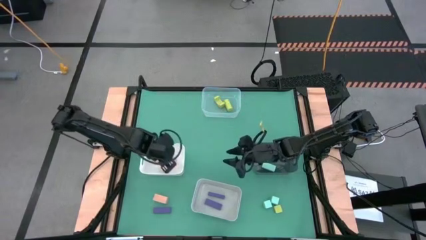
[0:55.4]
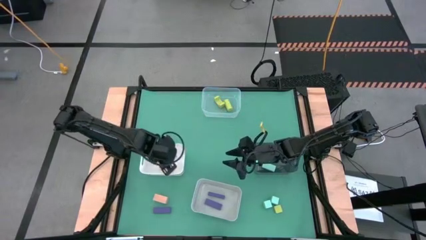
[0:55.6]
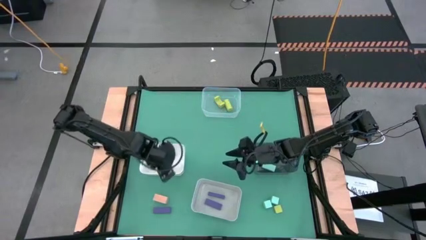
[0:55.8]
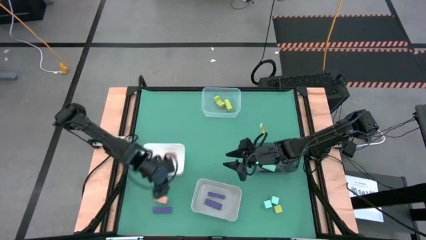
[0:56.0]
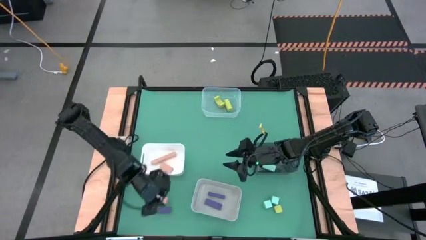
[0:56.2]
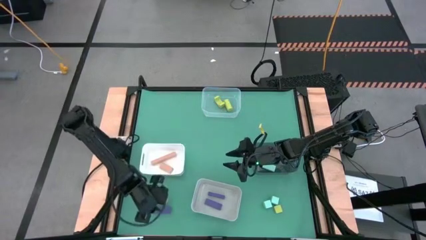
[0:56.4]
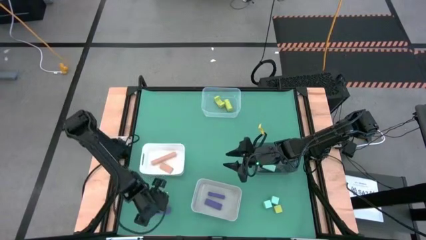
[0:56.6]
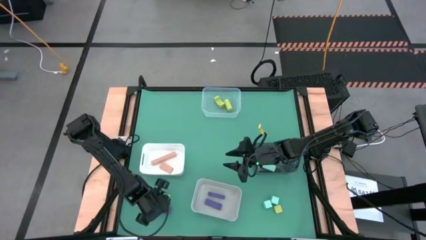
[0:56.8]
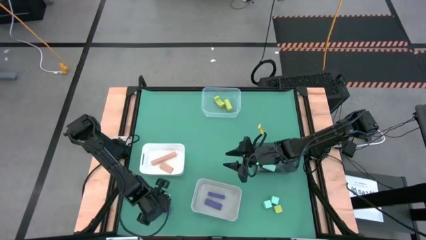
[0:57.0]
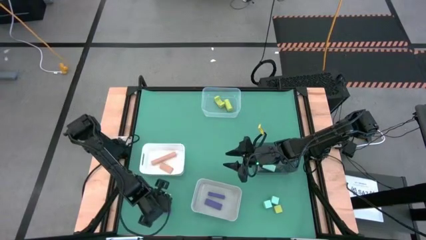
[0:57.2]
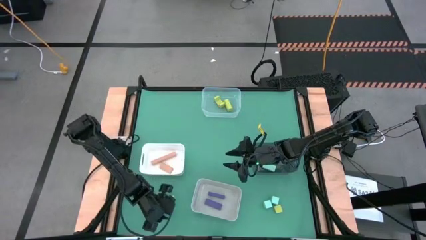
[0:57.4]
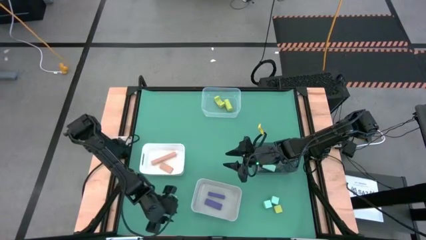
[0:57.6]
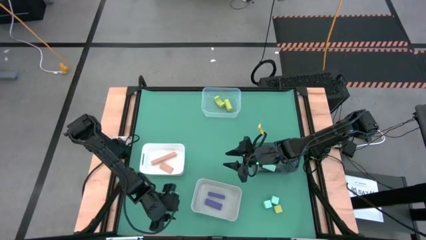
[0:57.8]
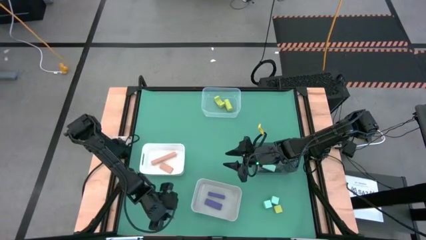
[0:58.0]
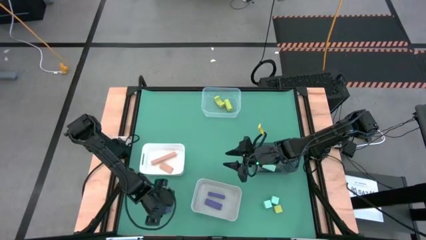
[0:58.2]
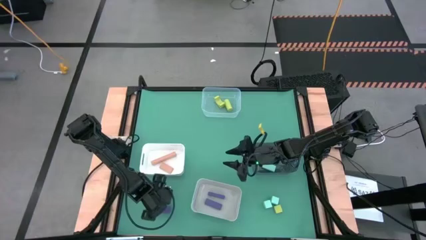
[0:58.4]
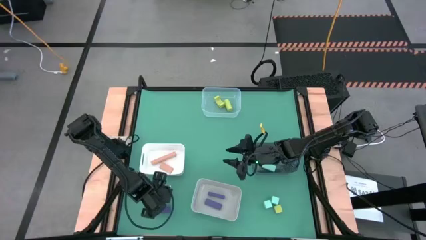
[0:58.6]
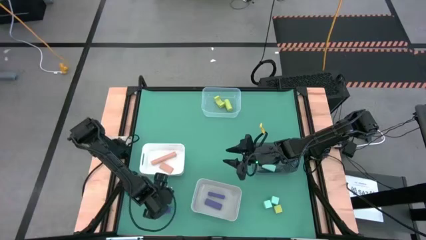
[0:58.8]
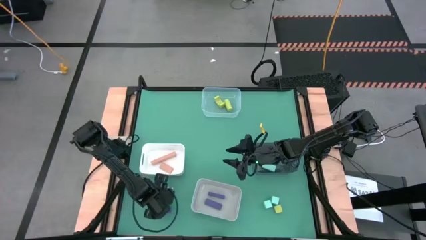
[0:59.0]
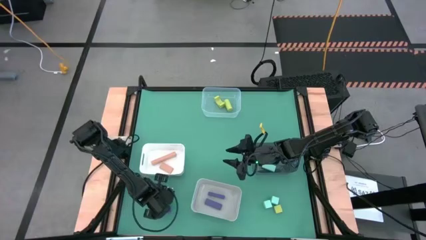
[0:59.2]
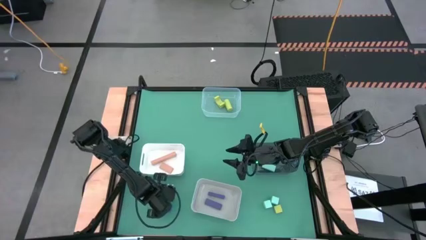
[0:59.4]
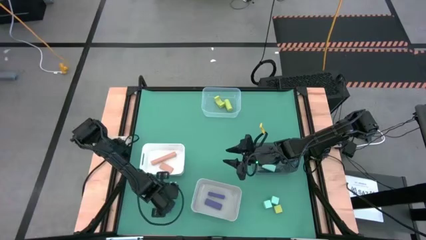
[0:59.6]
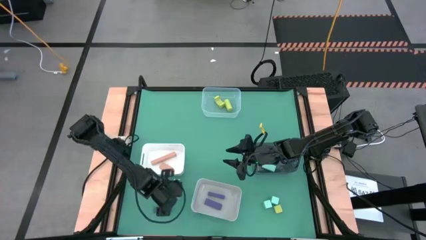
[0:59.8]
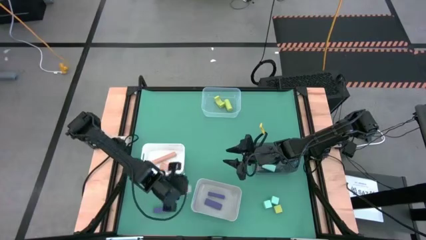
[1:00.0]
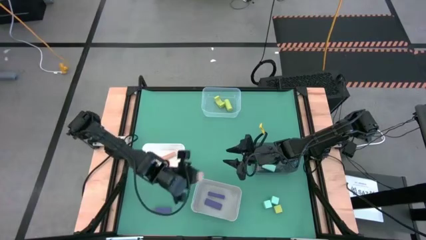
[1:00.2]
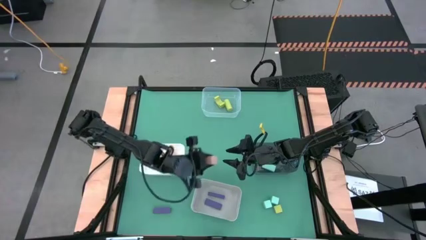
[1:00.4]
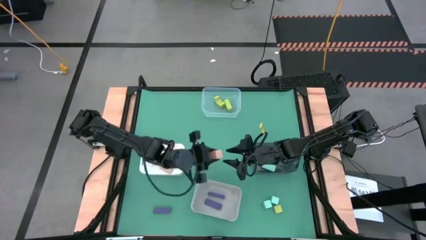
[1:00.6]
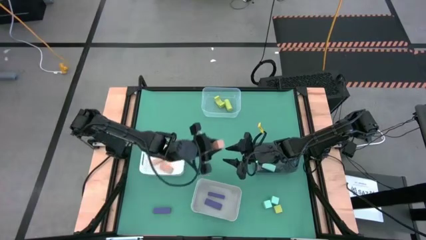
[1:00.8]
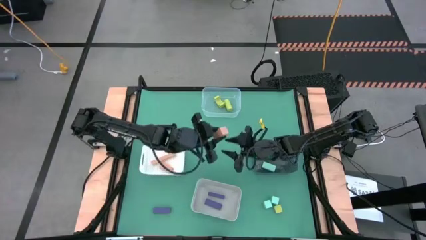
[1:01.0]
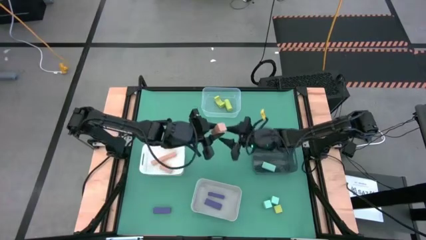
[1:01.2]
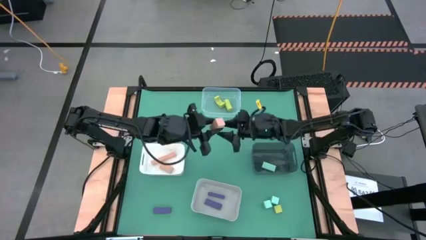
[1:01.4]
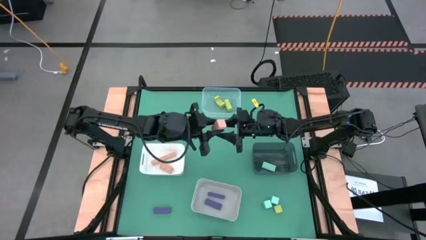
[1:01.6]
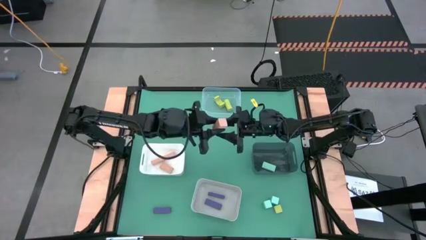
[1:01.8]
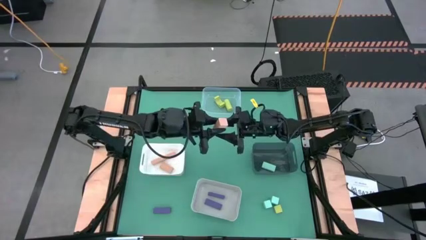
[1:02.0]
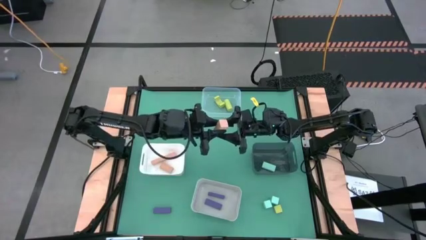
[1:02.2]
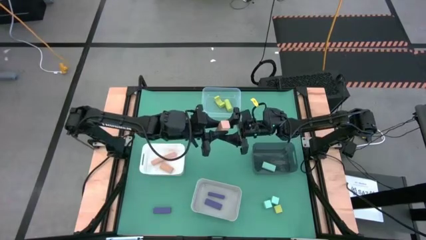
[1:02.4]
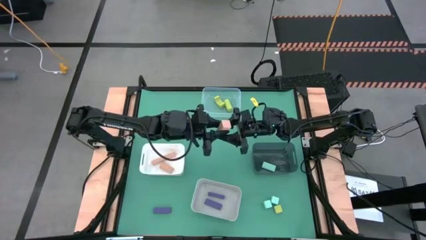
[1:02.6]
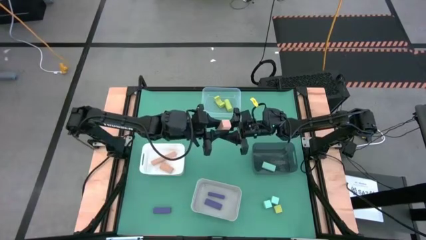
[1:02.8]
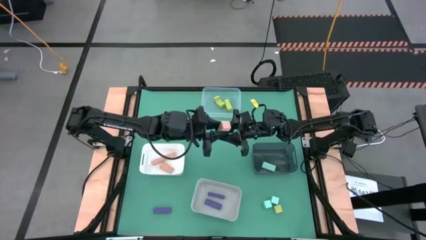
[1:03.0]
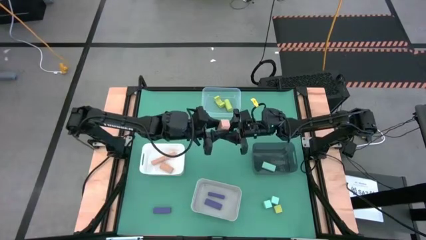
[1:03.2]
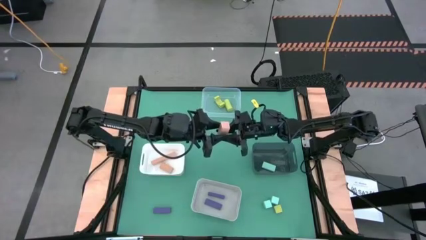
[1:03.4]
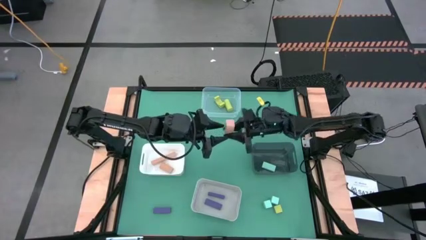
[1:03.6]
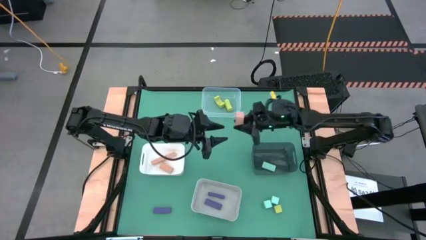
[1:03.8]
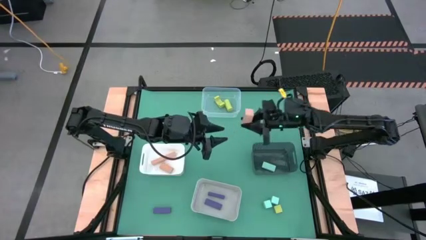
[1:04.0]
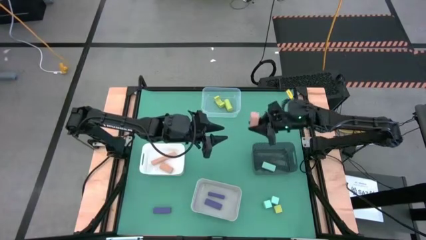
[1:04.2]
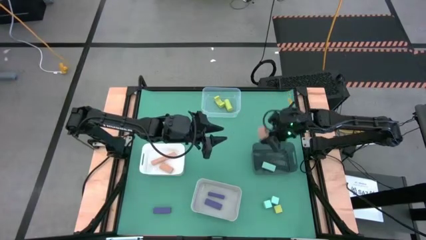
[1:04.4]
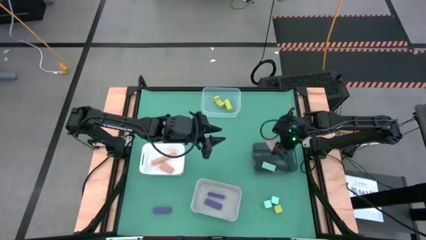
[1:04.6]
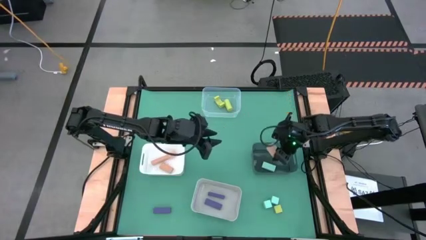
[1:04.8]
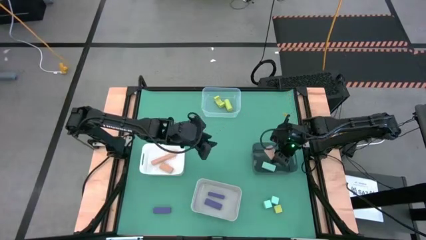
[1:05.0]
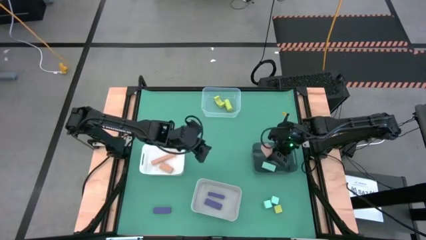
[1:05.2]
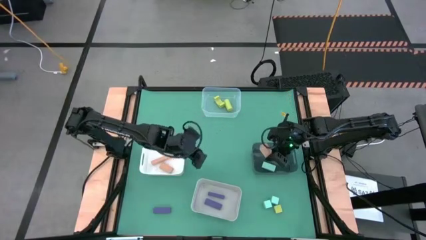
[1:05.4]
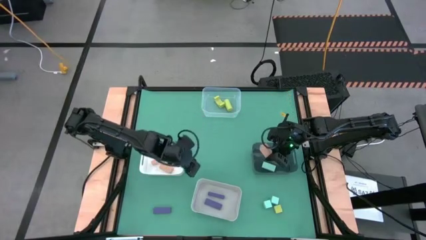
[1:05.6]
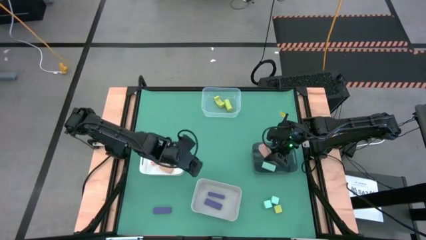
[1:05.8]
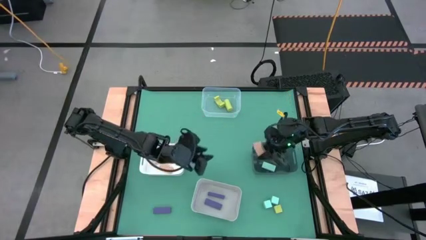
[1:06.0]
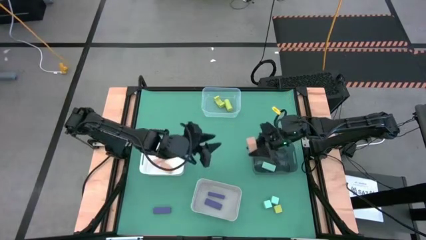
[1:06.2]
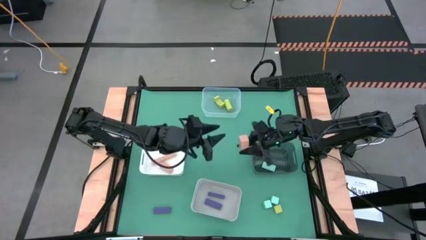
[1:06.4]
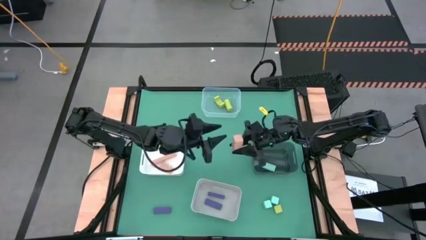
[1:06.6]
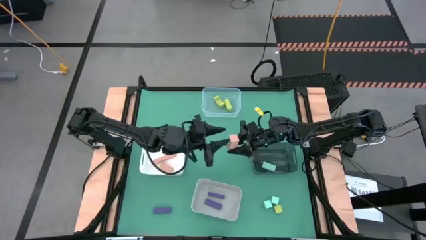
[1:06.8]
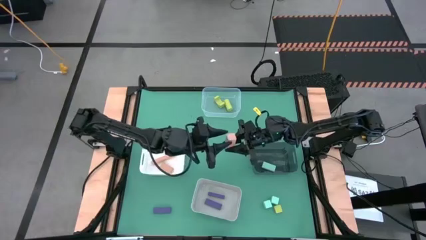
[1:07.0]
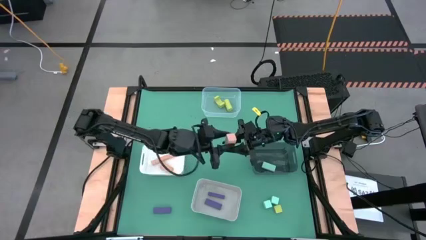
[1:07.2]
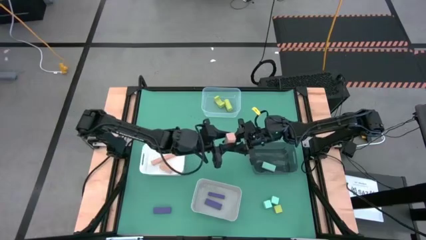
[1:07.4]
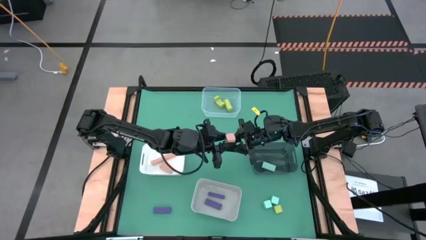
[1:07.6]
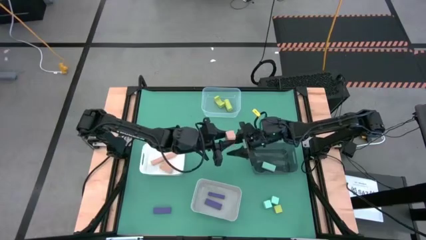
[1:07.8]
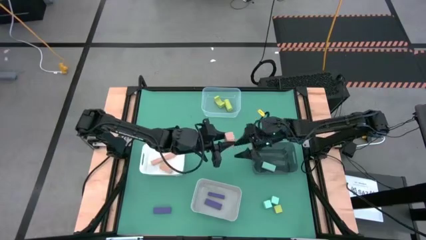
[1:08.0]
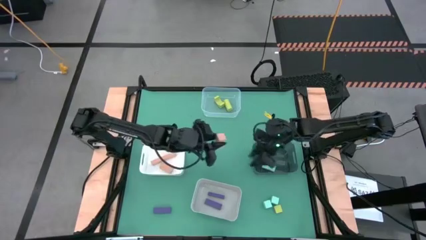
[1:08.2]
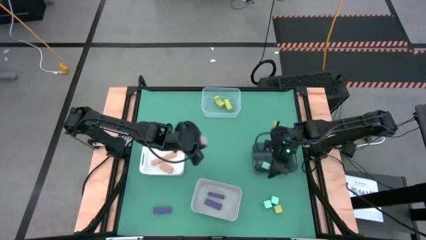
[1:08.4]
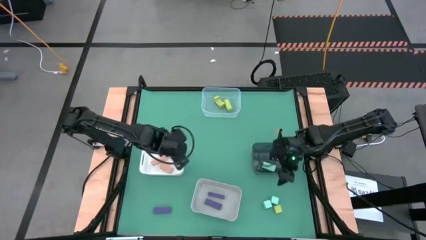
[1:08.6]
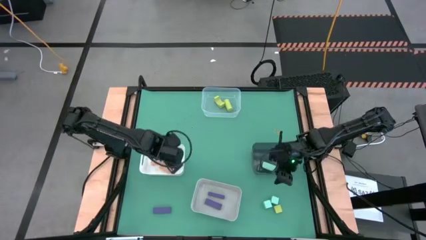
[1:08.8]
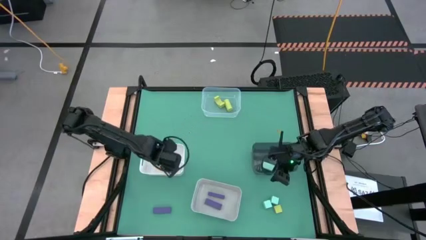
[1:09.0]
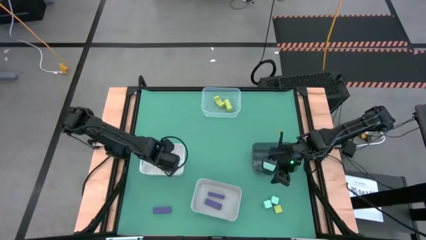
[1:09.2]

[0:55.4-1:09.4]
Task: Sort & place blocks by color
Put the light brown block into the white bin

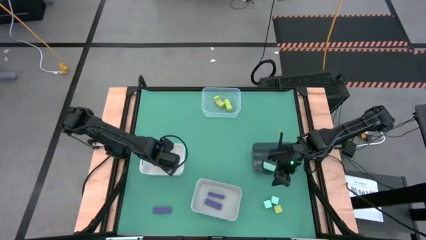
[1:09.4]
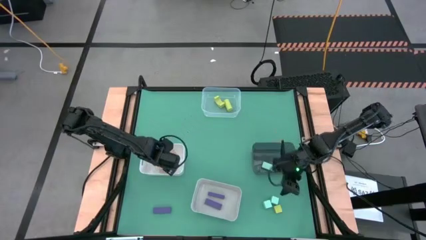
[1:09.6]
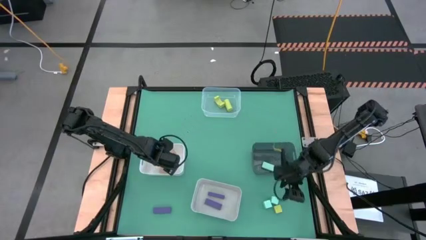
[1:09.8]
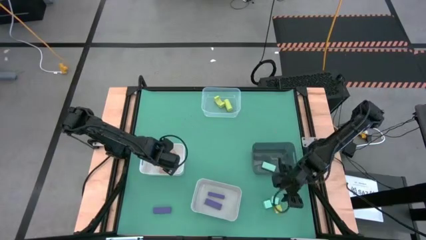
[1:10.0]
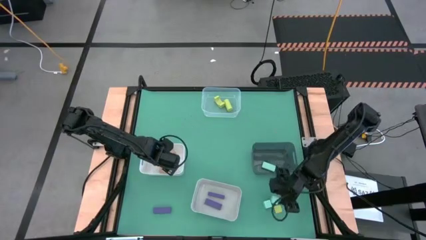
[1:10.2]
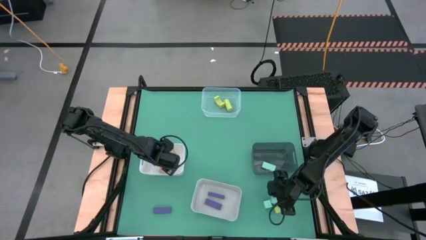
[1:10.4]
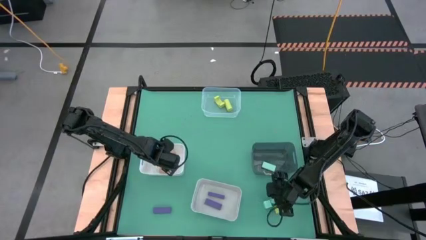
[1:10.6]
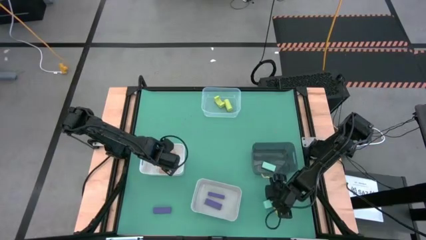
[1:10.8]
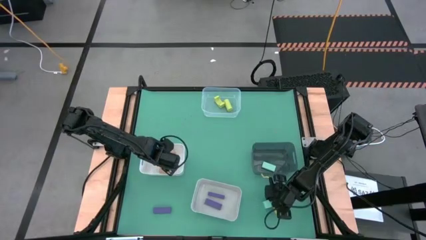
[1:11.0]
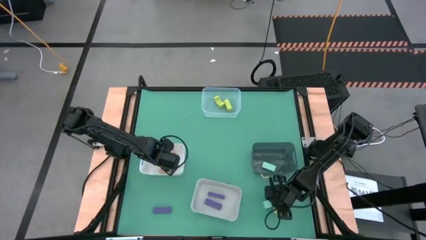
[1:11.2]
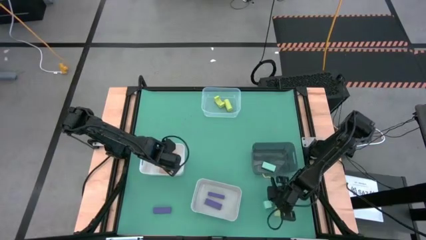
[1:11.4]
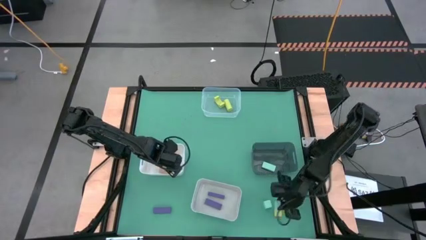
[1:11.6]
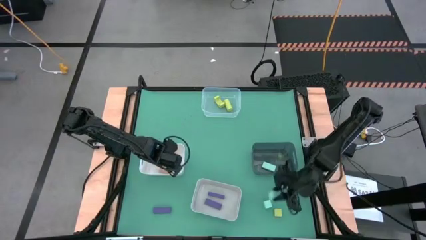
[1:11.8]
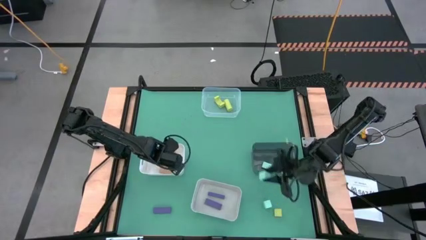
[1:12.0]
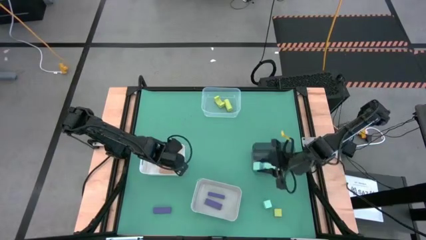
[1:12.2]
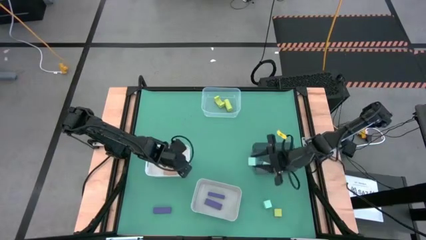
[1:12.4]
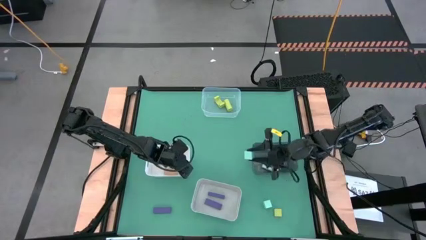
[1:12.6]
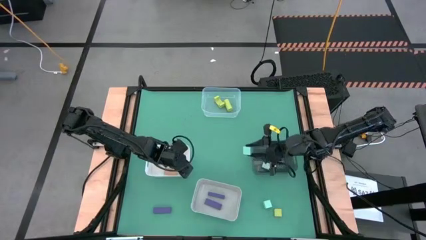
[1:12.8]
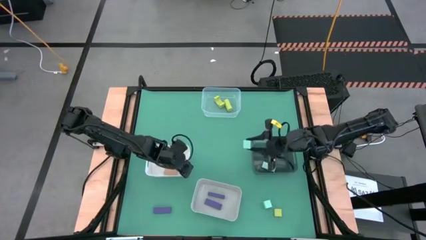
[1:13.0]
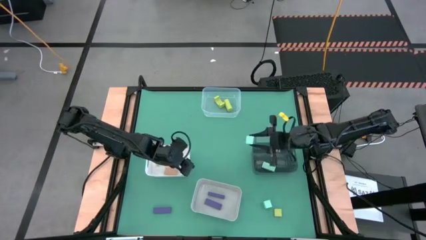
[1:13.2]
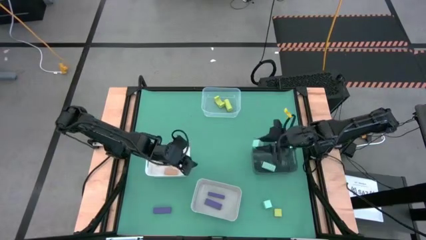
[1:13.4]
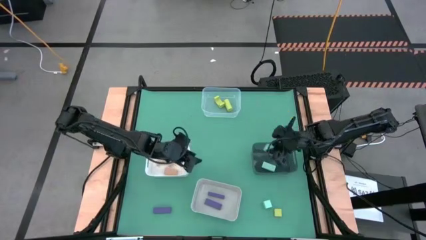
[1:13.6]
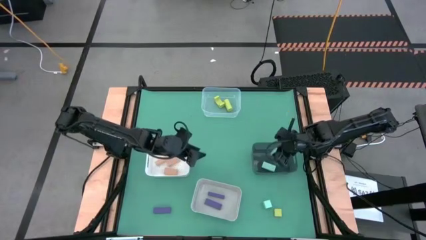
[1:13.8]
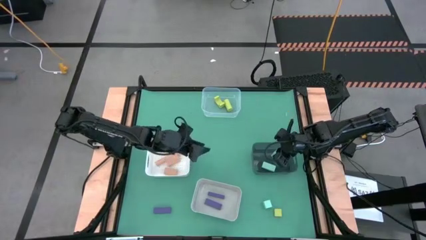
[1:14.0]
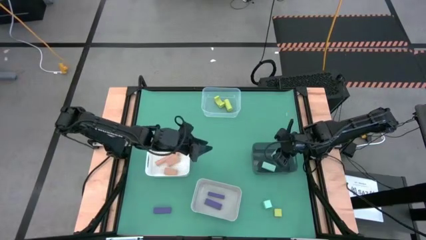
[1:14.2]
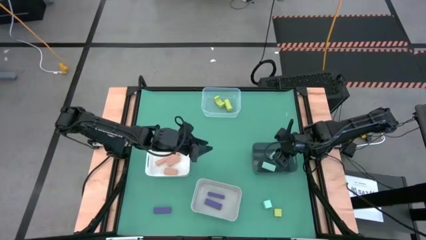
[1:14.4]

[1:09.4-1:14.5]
Put the right light blue block into the black bin
